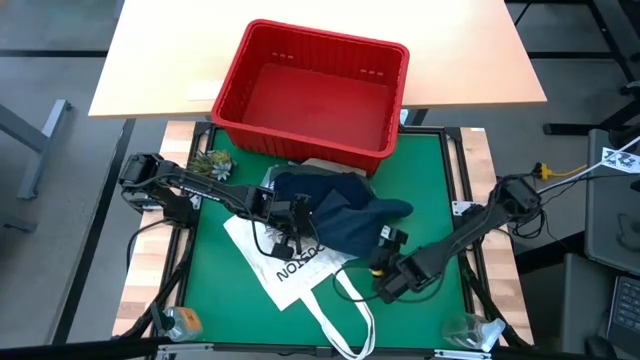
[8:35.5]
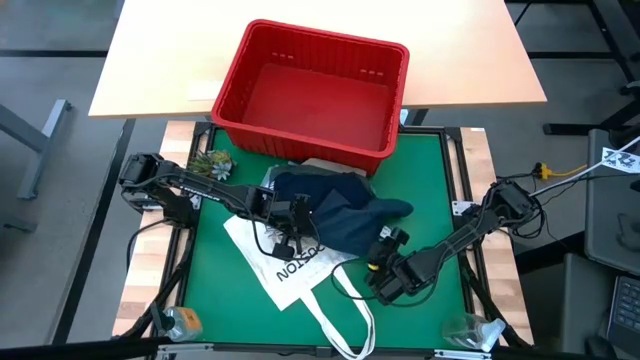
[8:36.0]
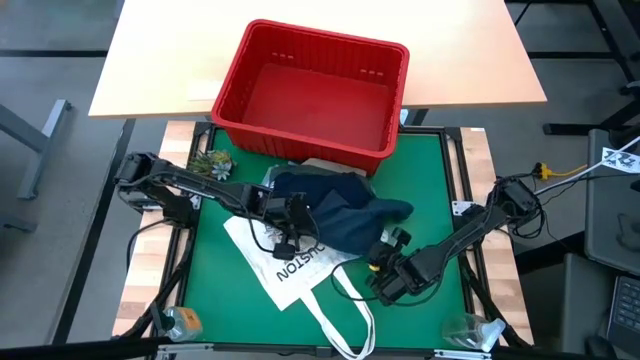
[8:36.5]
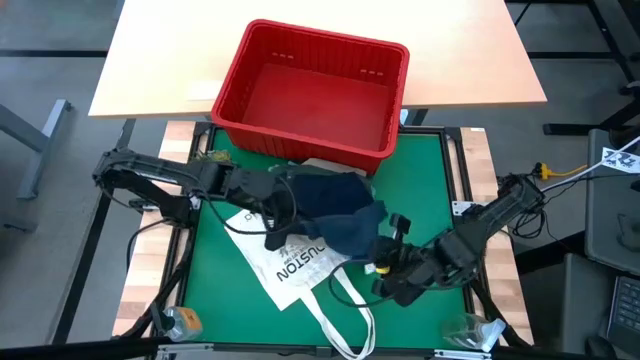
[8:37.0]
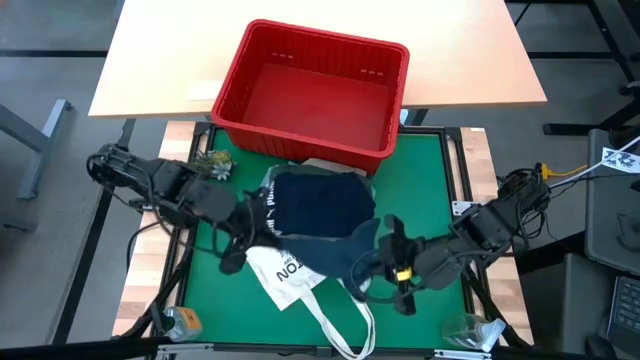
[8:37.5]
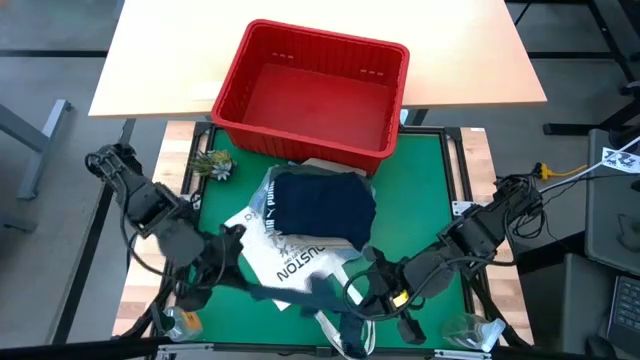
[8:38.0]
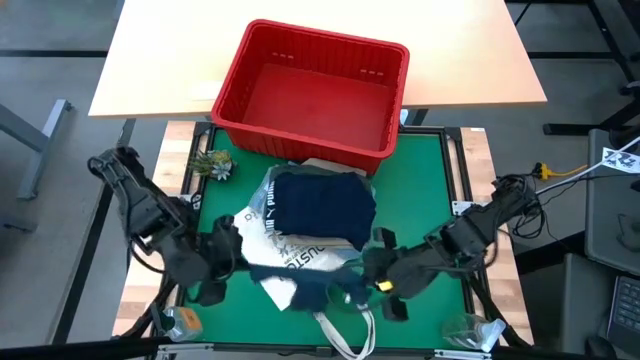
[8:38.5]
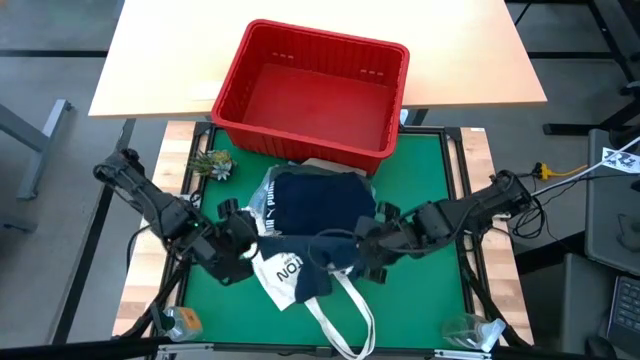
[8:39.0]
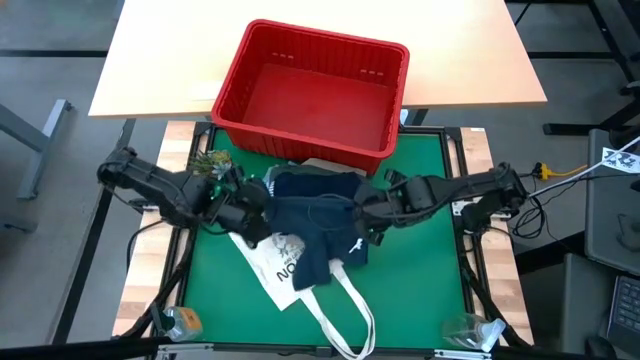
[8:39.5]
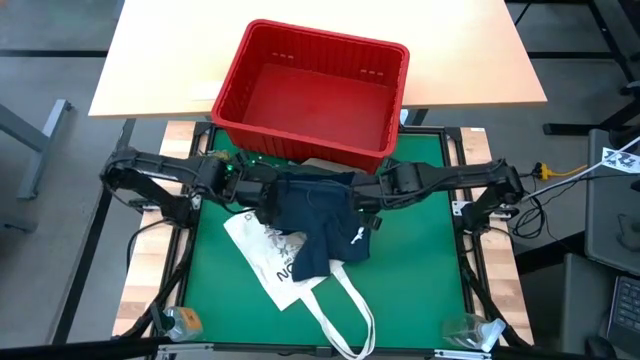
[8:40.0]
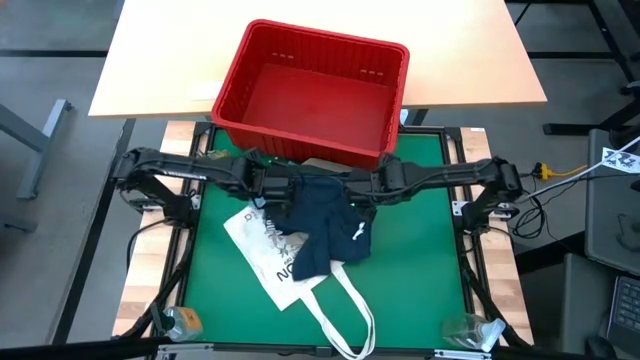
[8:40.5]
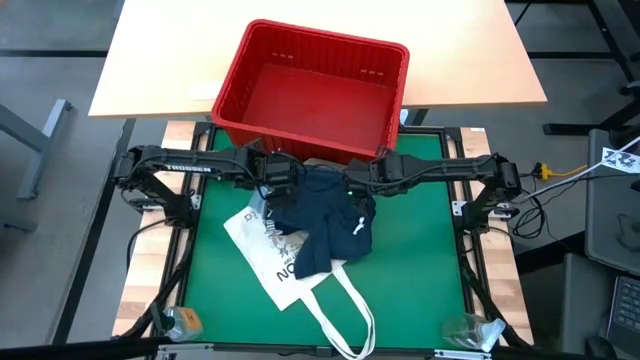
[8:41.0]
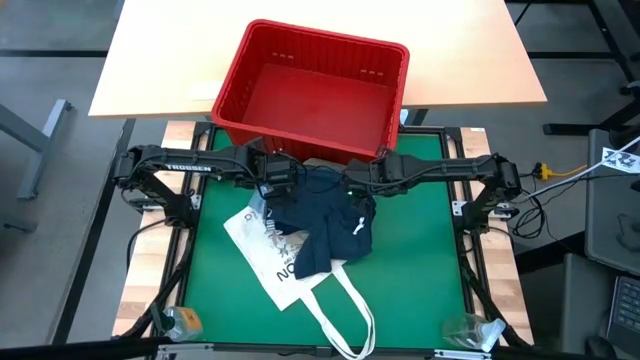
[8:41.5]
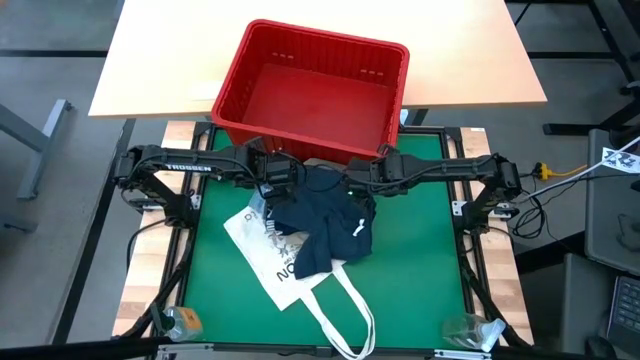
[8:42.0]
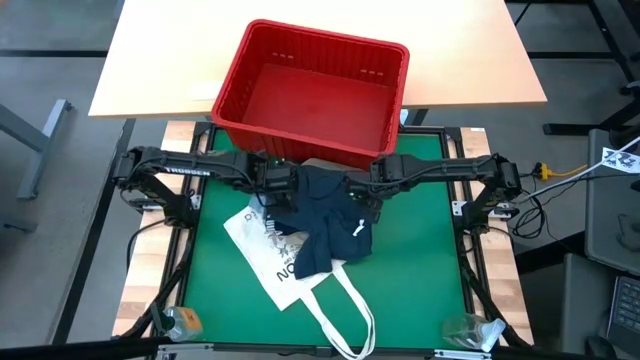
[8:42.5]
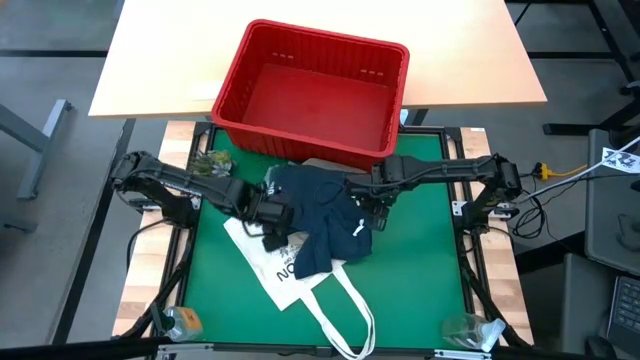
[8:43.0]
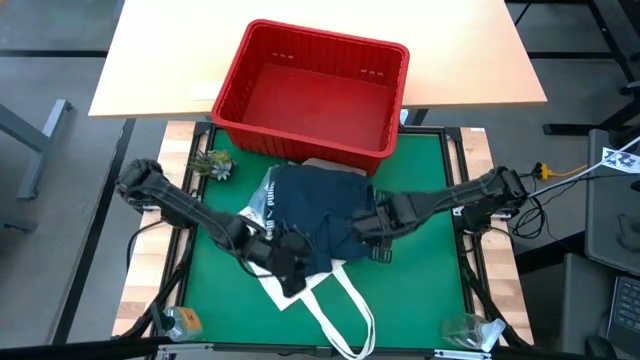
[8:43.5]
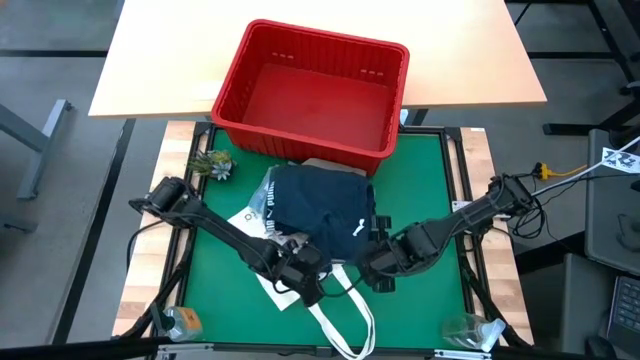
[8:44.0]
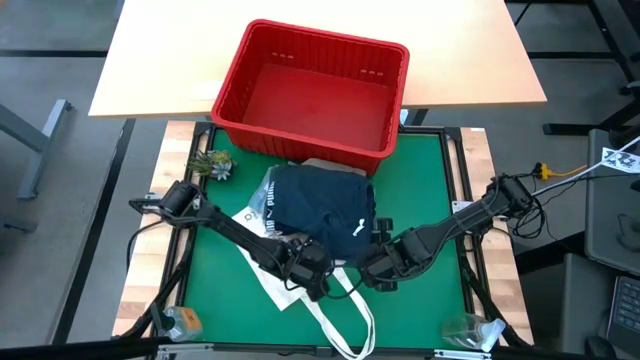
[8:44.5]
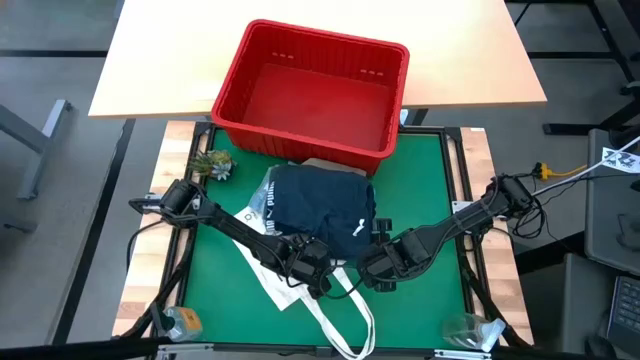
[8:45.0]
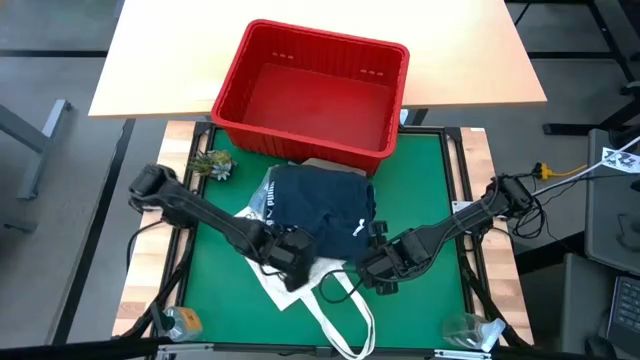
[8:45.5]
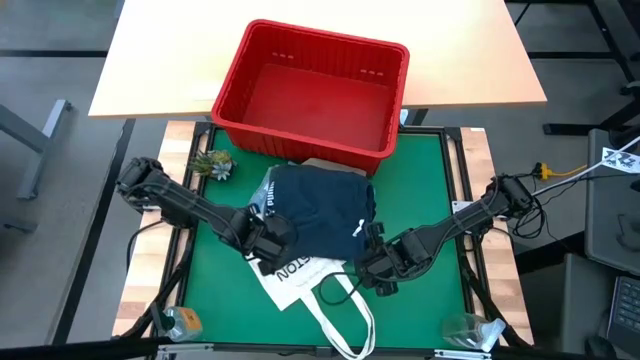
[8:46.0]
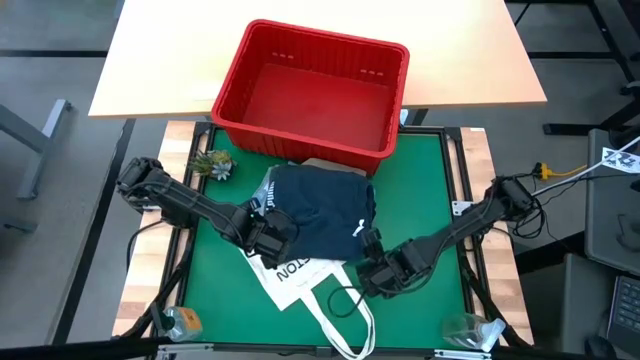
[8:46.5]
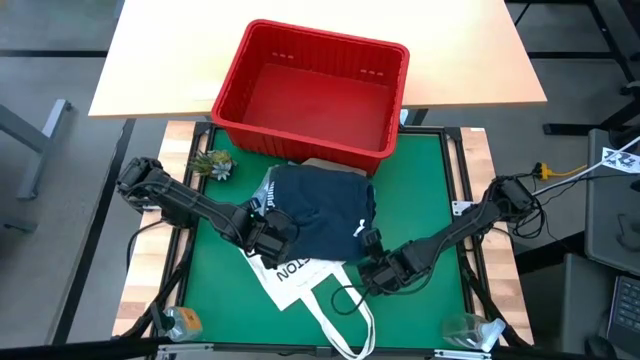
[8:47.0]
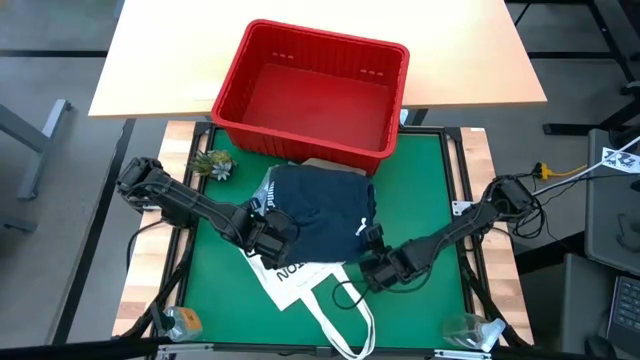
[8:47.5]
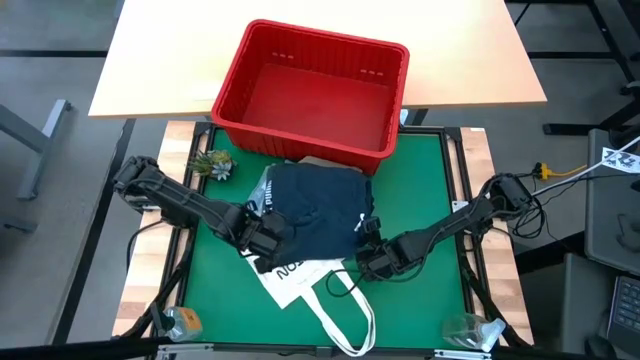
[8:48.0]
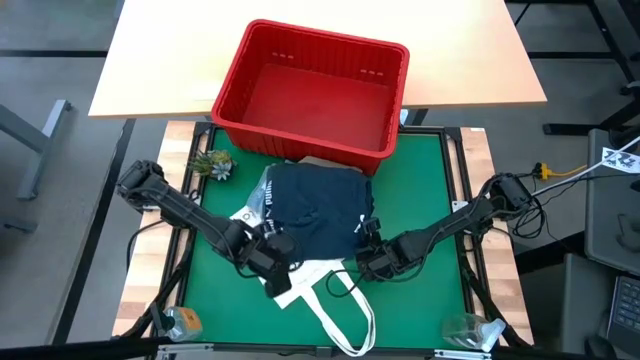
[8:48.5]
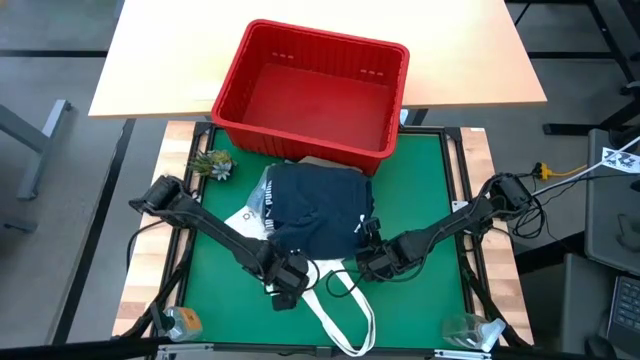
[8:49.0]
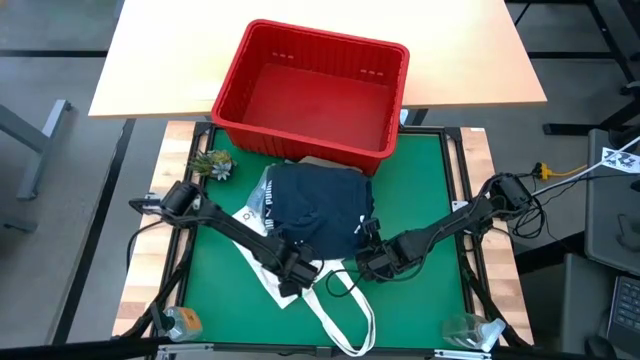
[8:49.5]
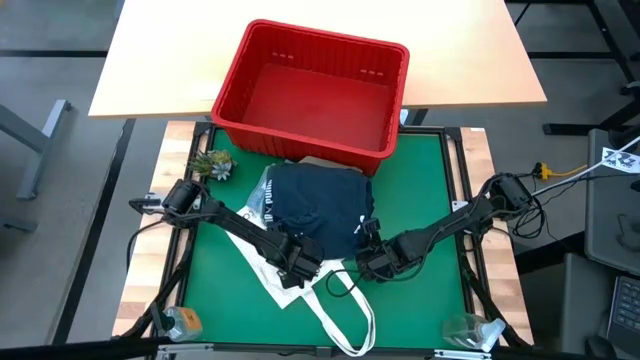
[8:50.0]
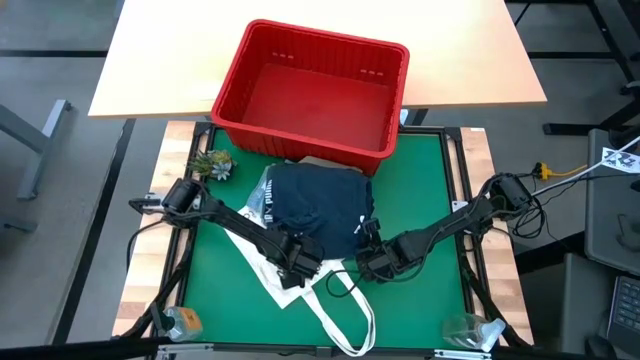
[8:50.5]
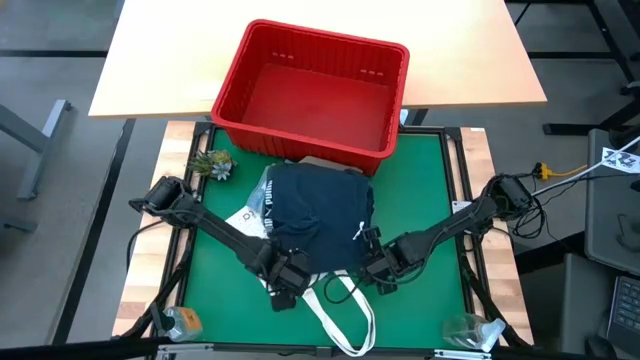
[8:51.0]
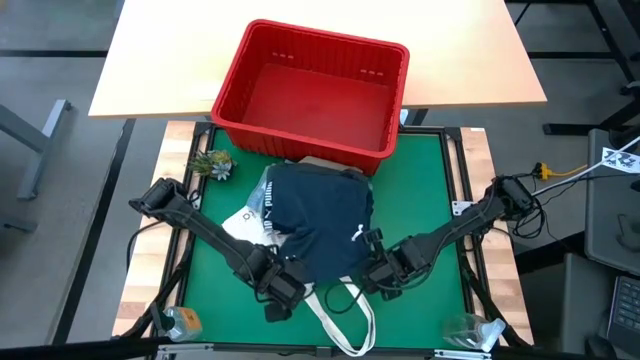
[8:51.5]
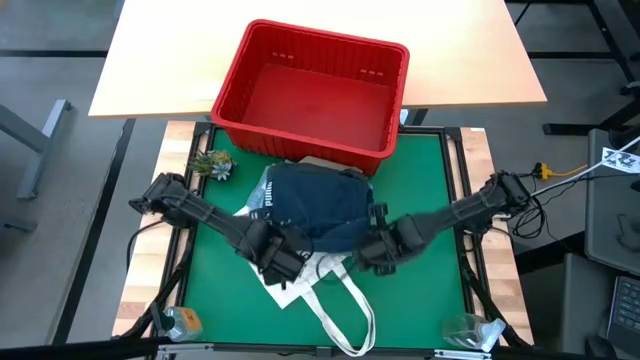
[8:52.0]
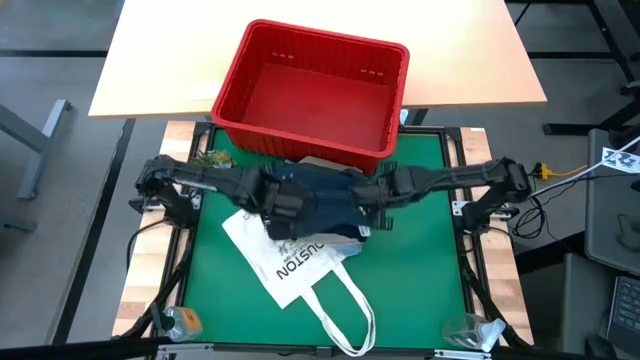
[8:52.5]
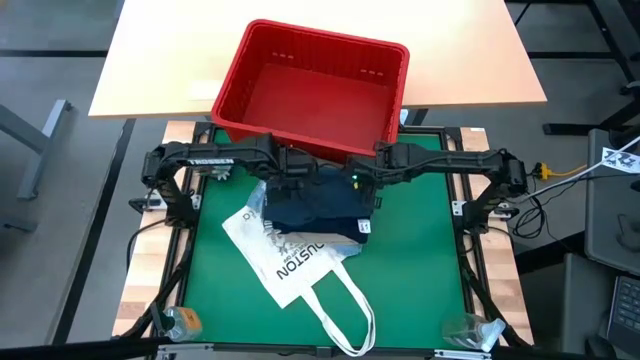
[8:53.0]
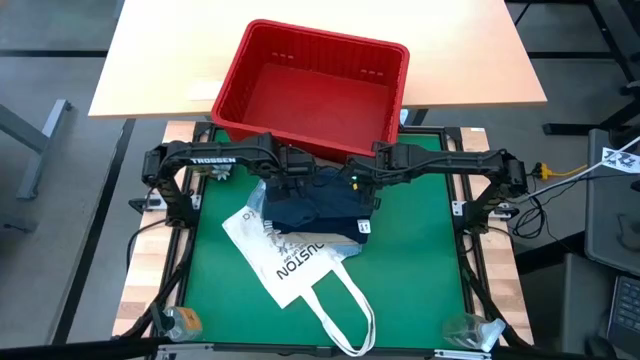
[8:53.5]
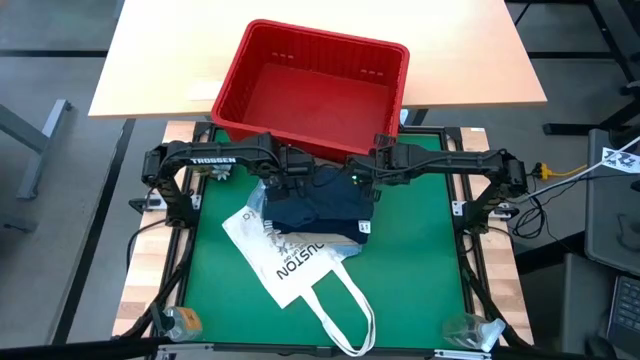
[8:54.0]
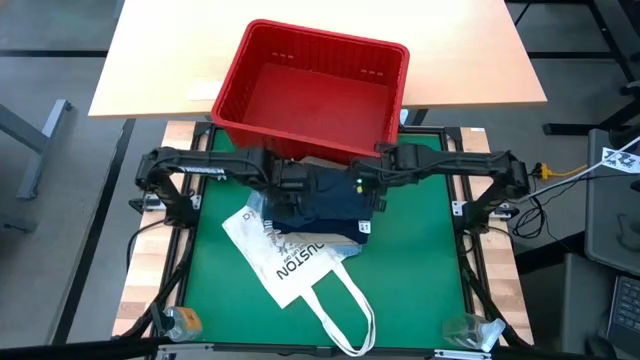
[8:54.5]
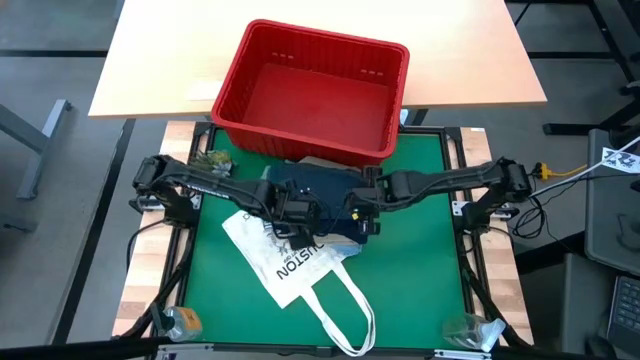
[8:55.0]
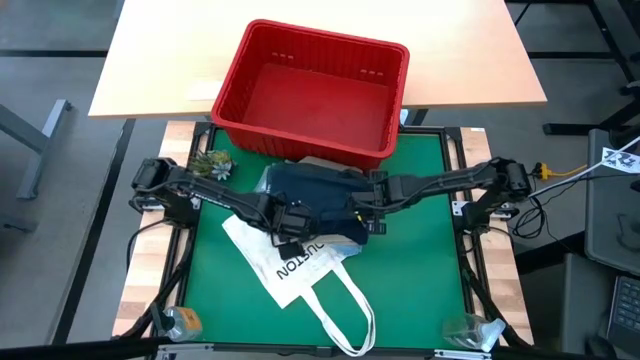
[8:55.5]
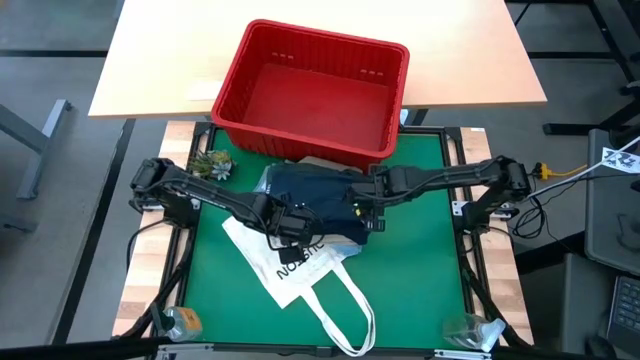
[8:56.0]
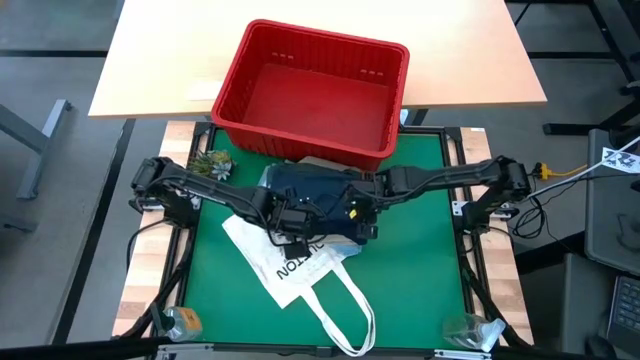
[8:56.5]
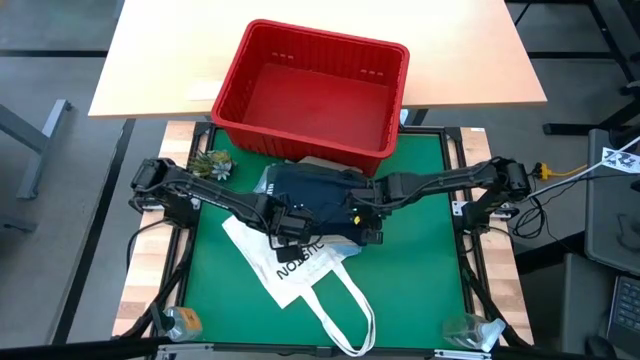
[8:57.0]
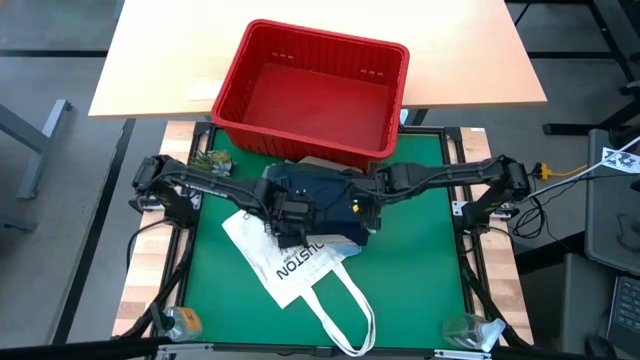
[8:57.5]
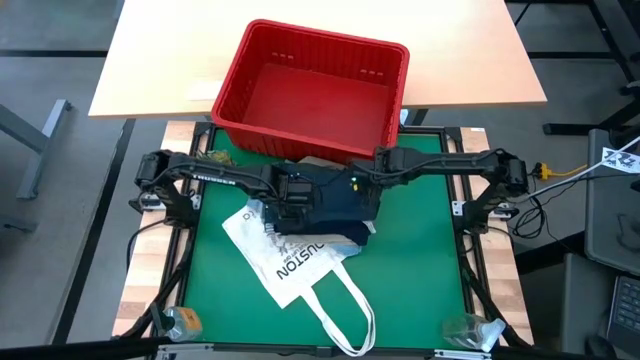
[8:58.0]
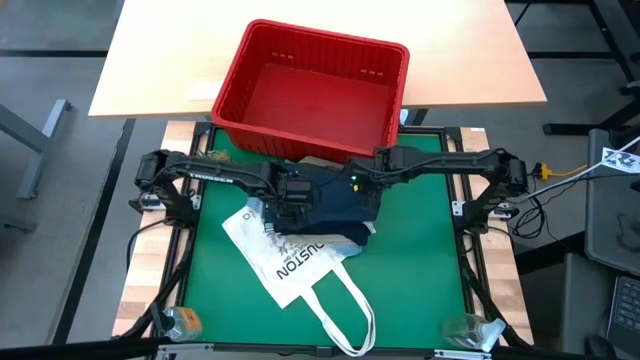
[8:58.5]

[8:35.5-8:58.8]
Task: Fold Laundry from Bin
Fold the gray shorts
